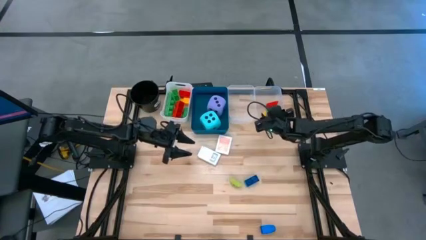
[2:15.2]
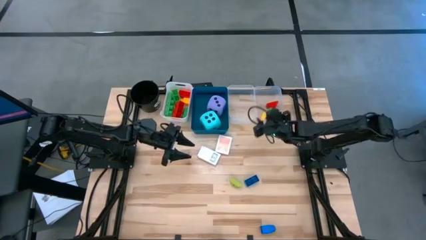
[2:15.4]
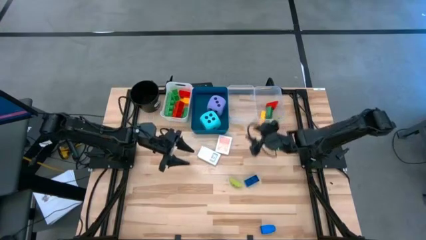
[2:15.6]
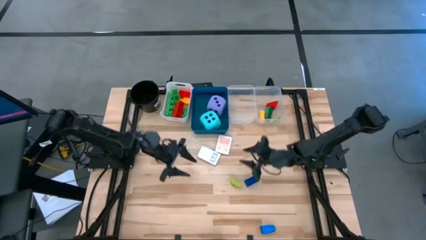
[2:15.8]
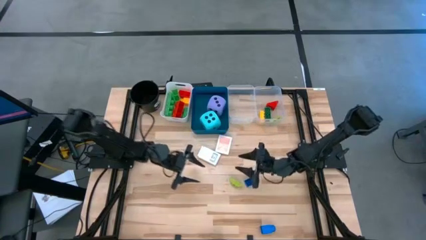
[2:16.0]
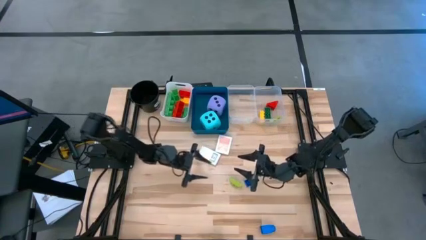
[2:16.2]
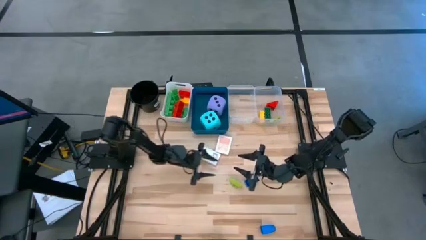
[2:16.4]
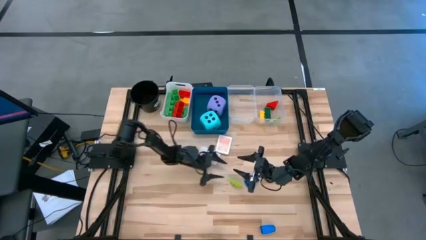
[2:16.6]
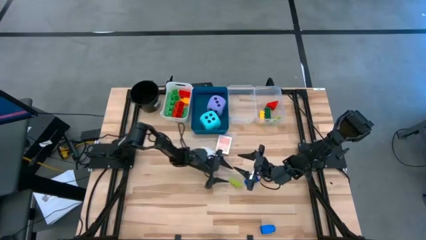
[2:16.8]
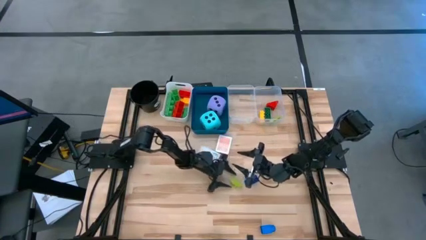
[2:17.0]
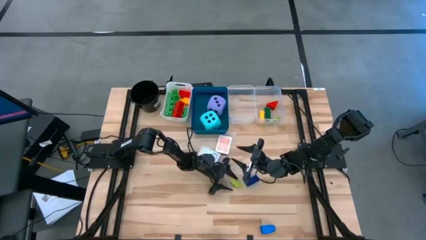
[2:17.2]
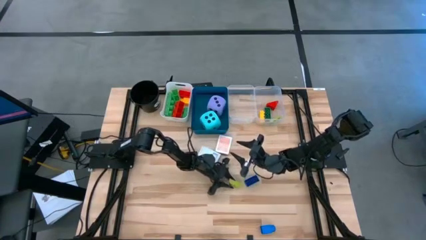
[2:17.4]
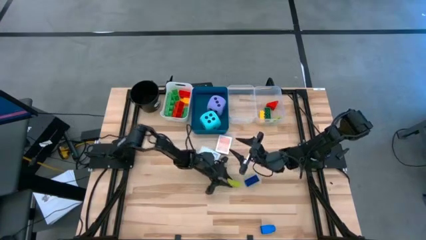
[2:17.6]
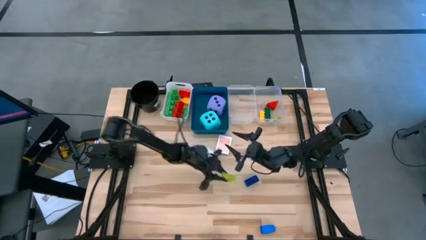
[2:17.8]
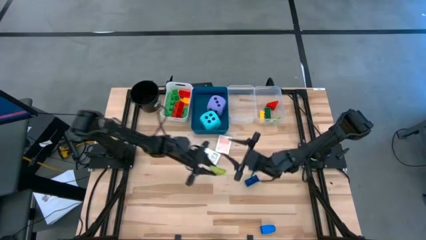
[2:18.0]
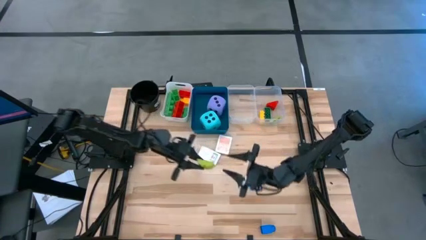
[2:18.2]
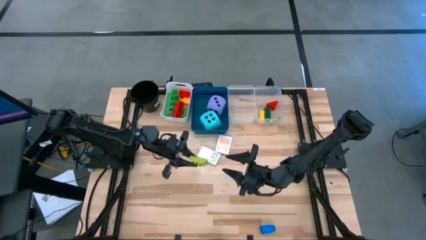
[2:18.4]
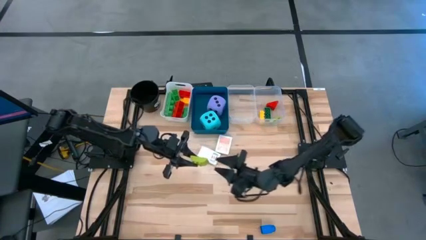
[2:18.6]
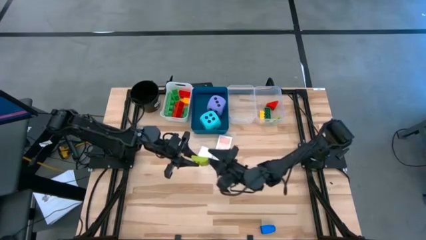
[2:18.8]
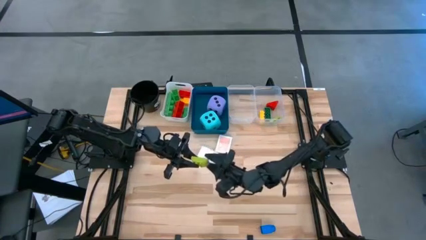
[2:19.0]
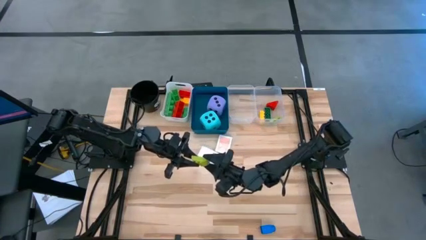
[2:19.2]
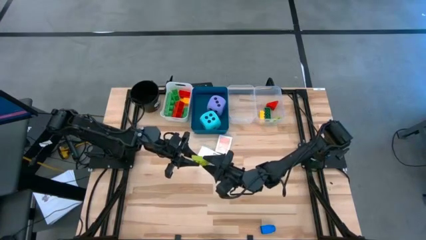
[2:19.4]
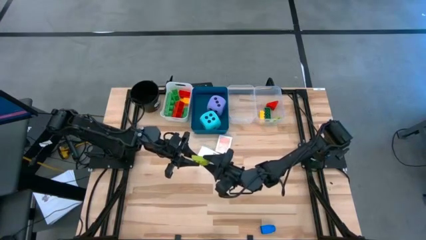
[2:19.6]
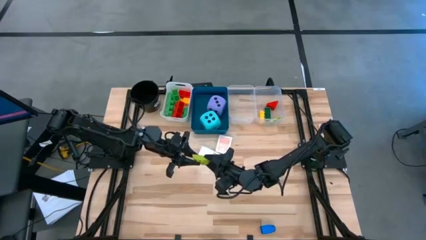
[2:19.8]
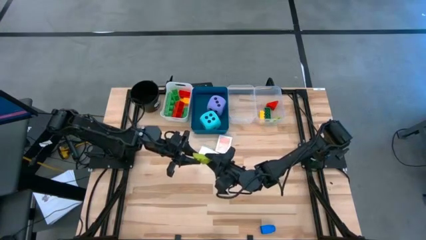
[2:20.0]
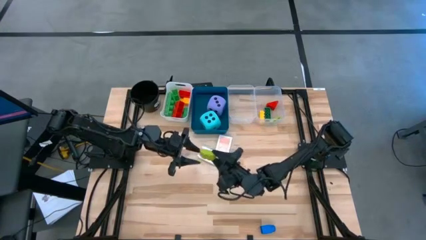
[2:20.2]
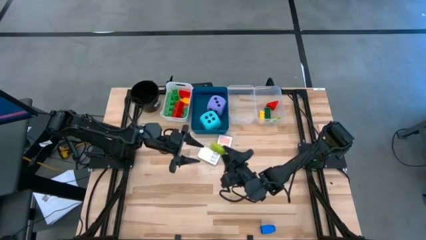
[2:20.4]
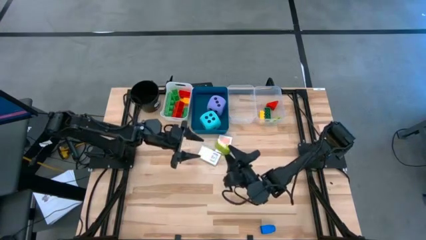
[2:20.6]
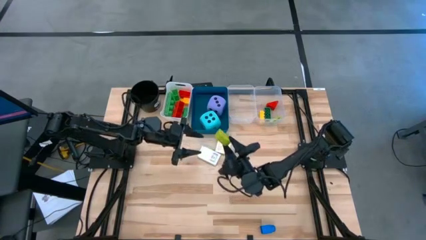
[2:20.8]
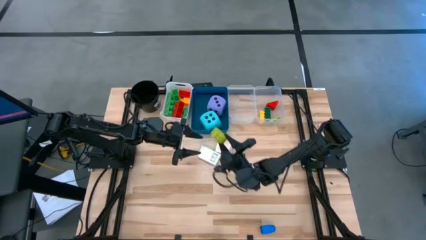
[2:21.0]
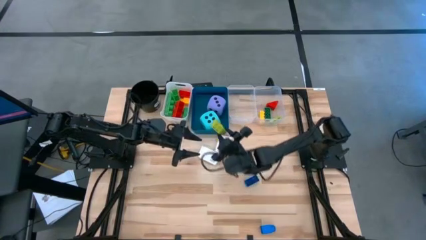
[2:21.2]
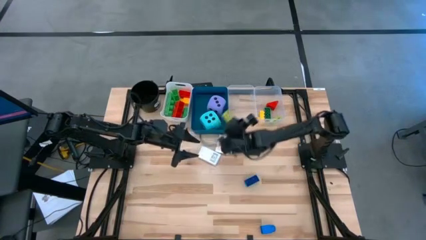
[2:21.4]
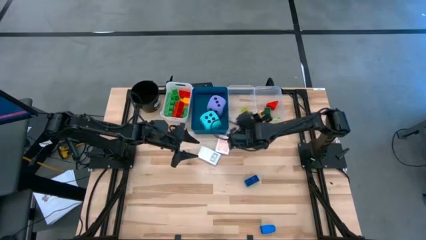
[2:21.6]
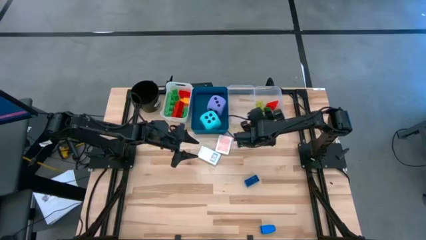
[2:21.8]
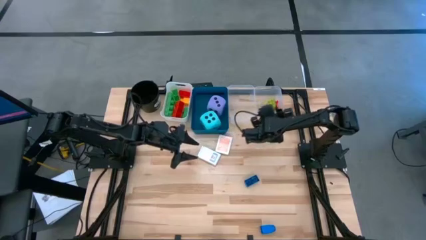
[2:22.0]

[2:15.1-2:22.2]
Task: Pick & Place Toys
Put the light green game piece into the right transparent bin

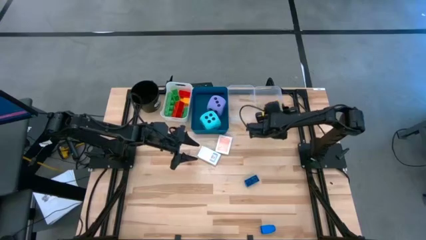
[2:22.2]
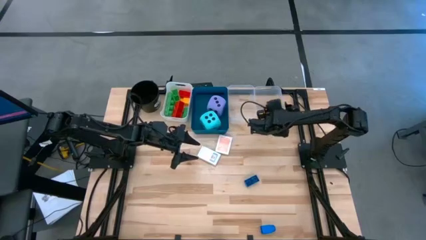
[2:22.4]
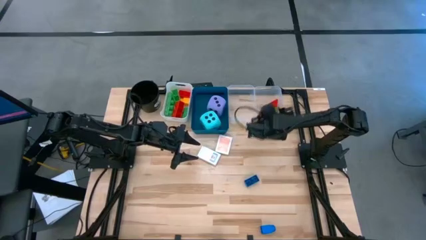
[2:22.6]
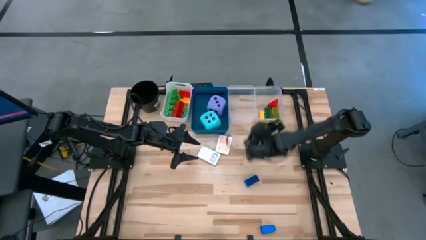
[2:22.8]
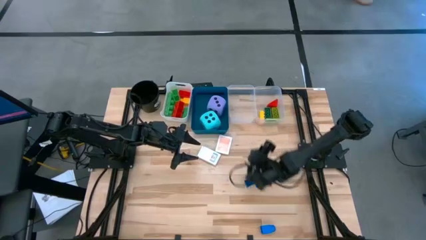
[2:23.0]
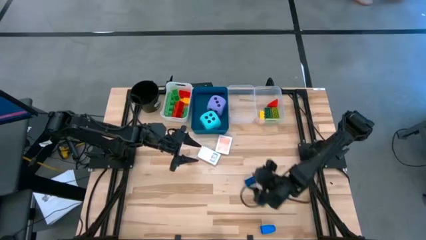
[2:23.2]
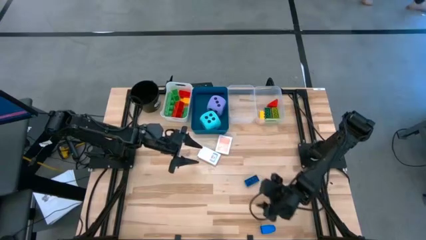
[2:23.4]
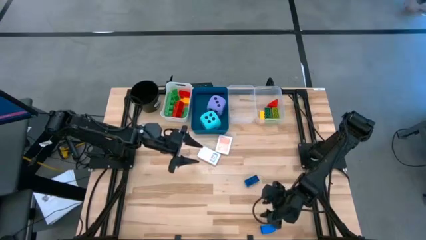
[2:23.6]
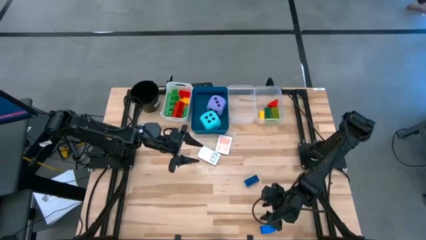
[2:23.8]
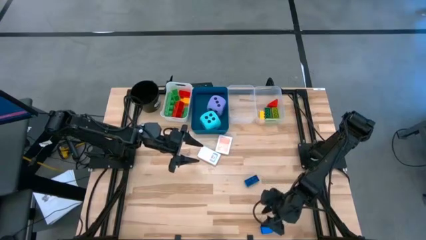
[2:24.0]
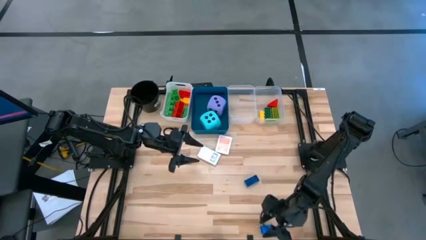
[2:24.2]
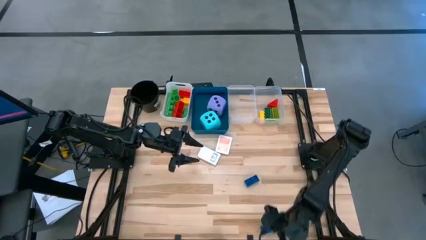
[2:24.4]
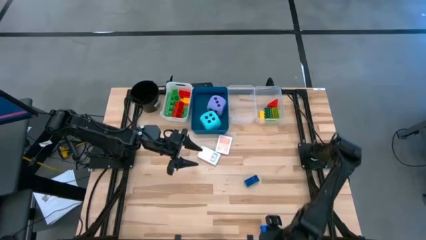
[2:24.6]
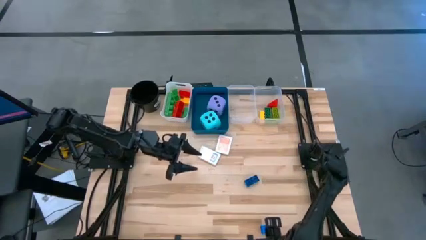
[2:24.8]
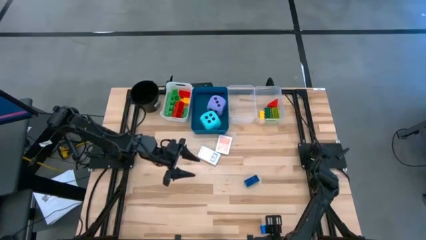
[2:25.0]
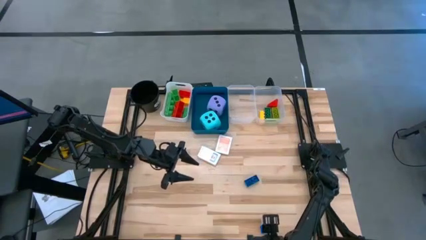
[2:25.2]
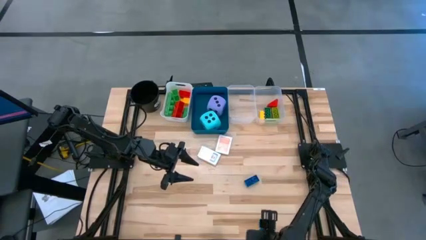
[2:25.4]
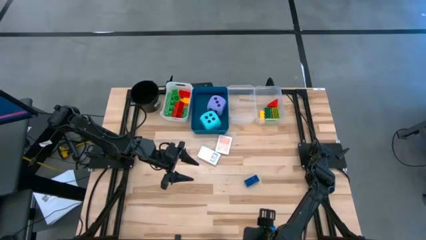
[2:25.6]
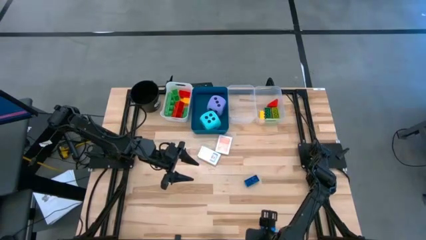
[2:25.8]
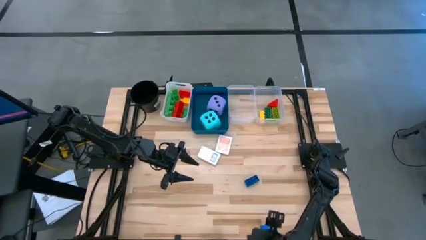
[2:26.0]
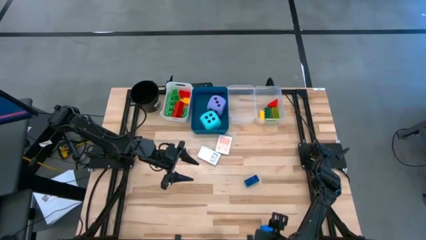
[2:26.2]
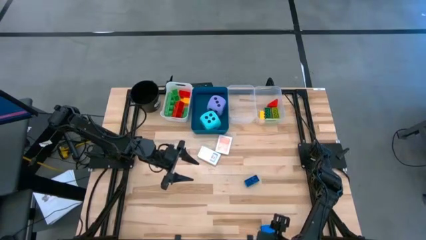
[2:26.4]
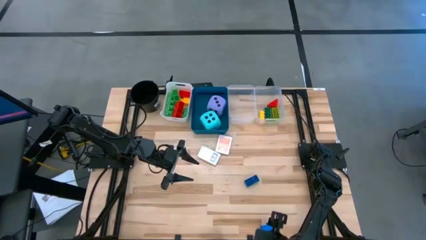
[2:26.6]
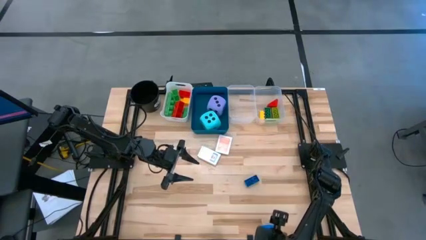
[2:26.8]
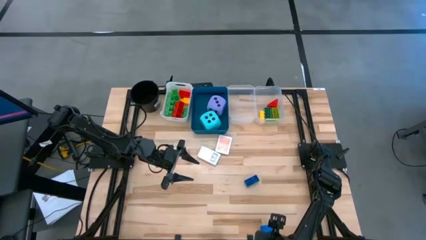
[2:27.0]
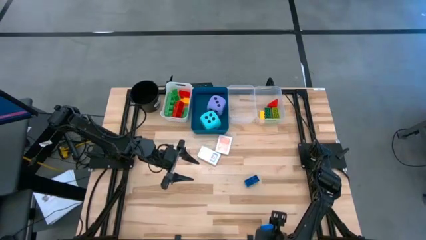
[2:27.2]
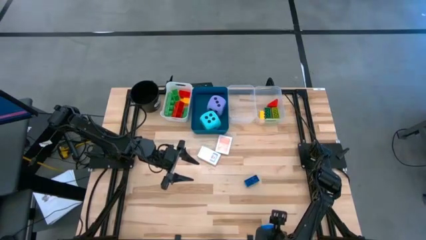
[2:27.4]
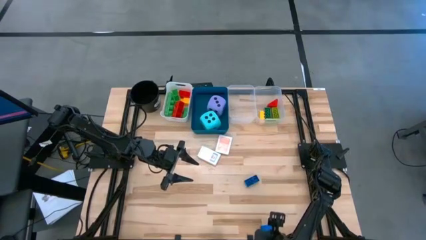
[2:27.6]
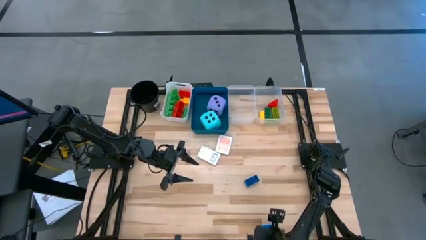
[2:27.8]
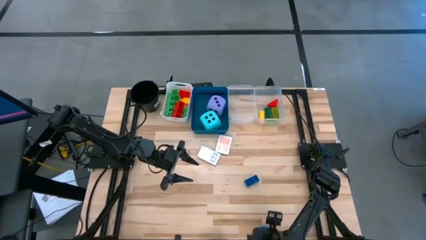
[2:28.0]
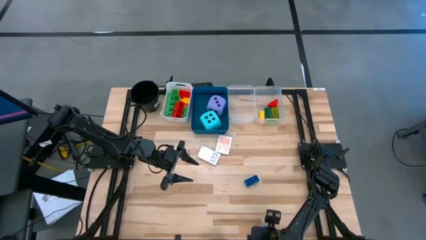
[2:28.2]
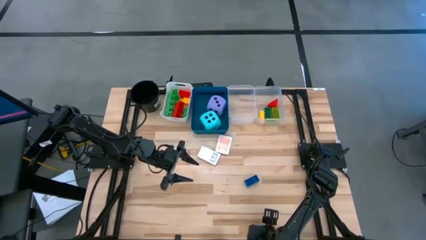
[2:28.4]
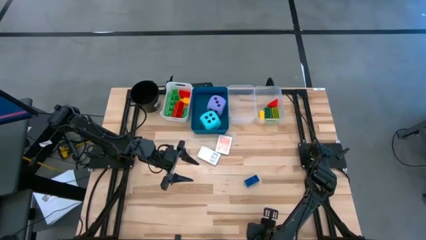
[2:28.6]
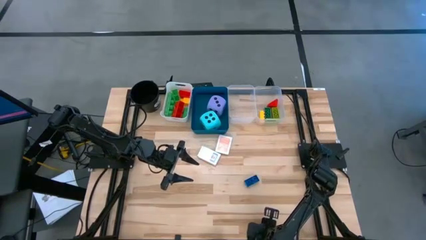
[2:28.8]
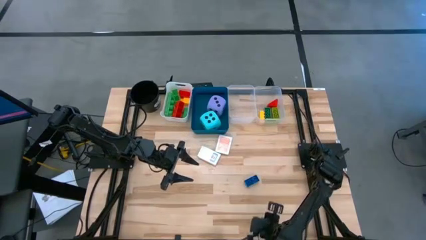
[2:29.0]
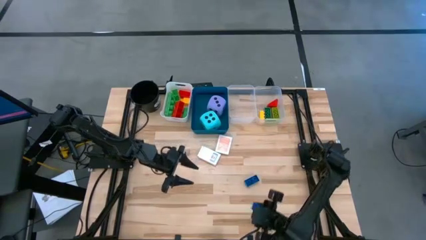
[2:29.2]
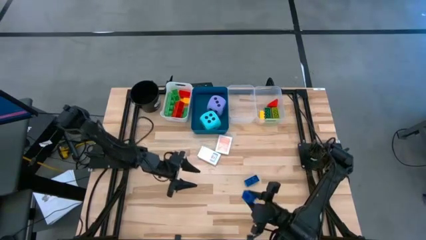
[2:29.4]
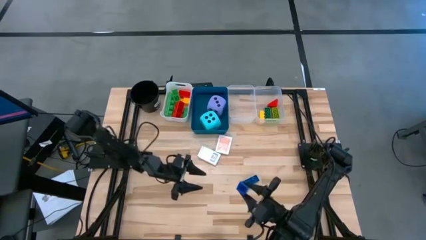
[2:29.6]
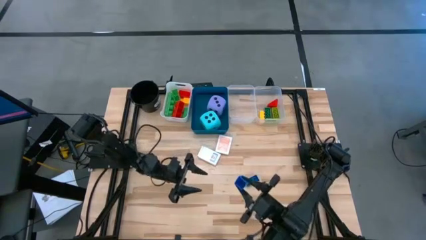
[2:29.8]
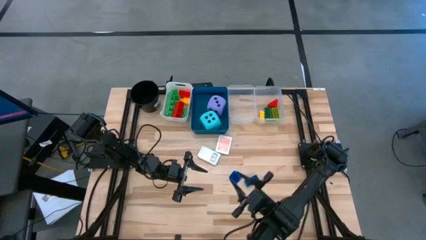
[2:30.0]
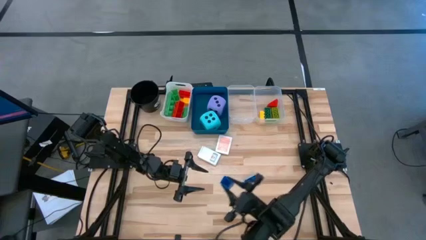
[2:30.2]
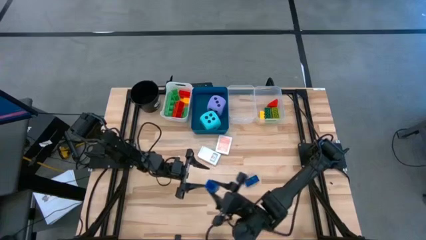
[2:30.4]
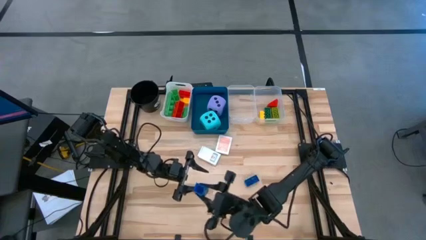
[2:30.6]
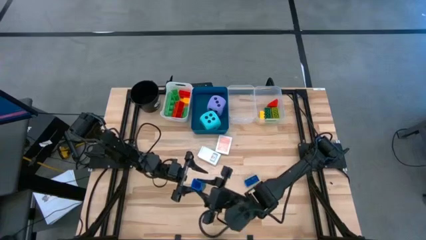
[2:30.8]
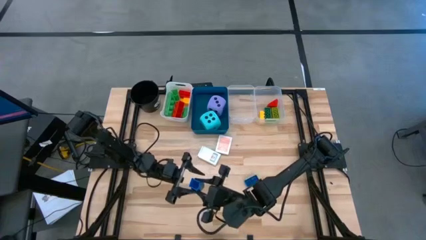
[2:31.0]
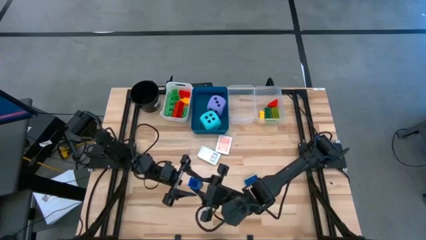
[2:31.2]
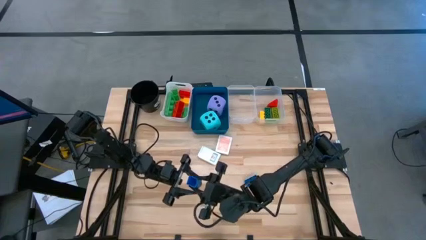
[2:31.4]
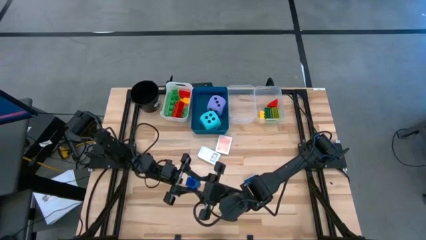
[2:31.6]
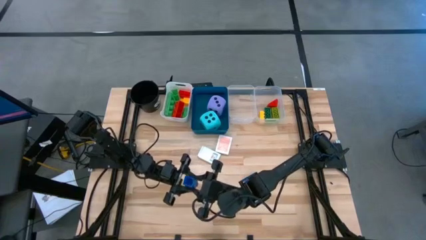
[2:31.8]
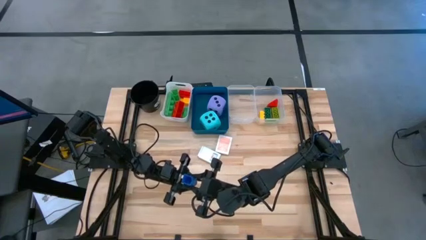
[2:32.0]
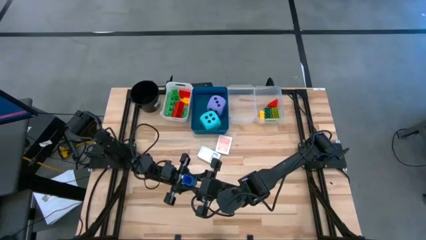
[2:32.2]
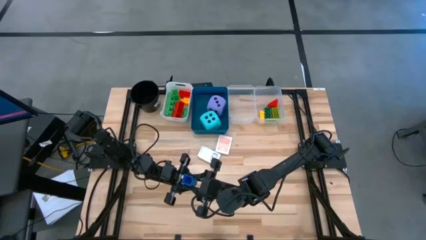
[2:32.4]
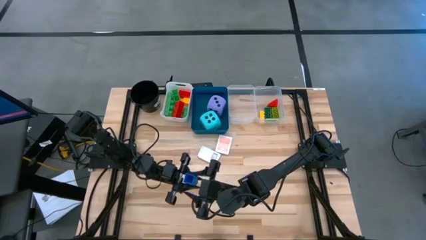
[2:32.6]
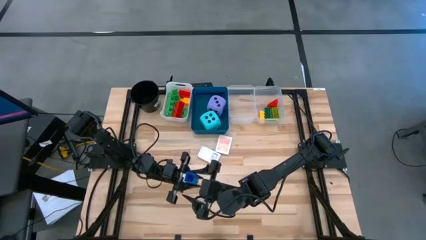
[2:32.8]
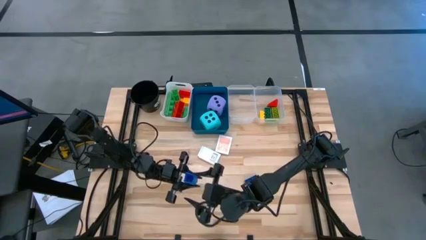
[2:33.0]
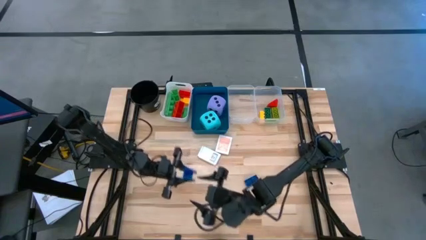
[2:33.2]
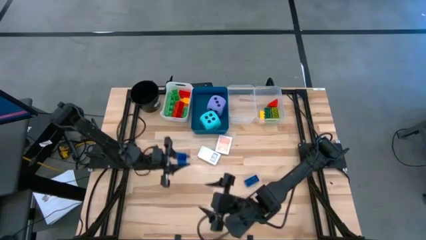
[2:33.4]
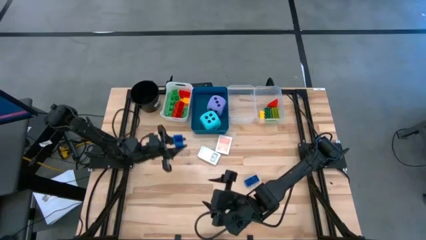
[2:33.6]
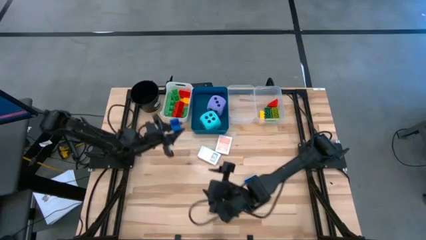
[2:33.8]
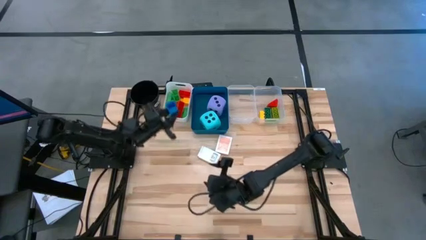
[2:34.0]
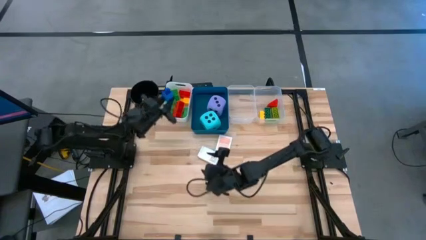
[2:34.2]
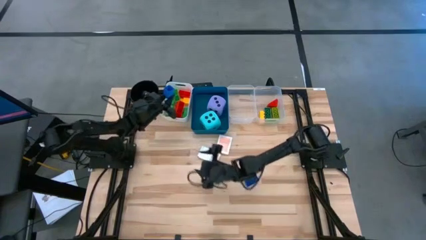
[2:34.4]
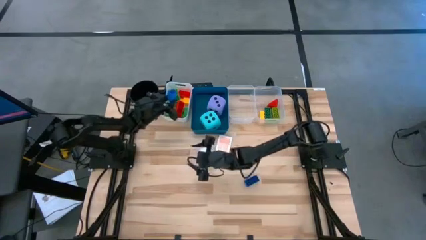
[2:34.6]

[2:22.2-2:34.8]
Put the large blue game piece into the white bin
